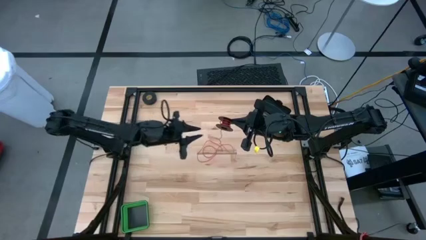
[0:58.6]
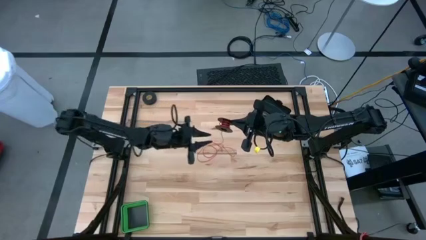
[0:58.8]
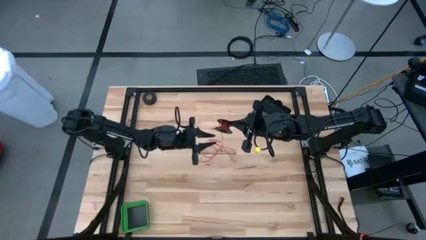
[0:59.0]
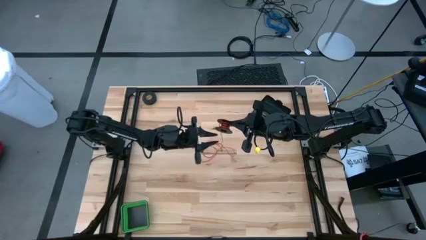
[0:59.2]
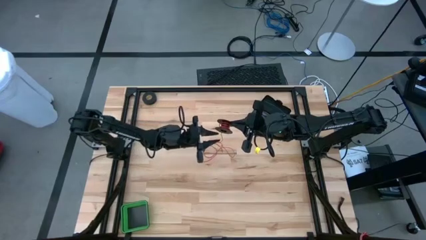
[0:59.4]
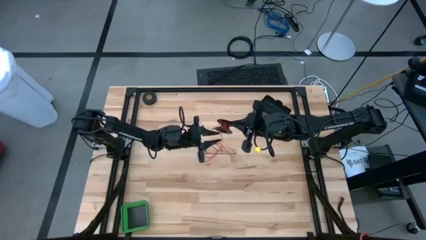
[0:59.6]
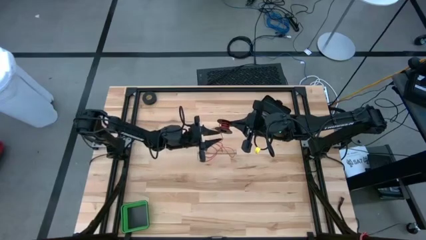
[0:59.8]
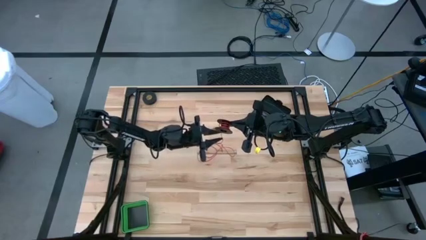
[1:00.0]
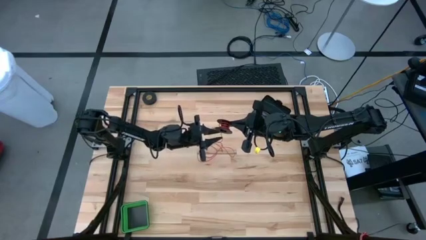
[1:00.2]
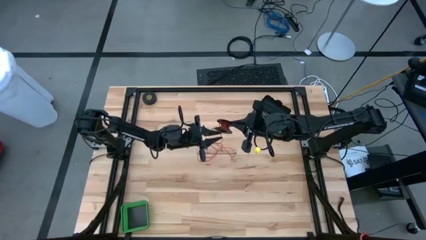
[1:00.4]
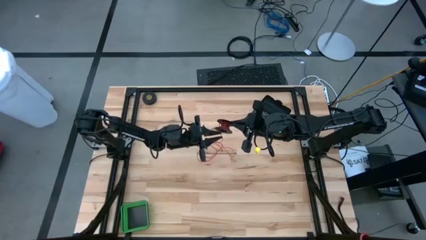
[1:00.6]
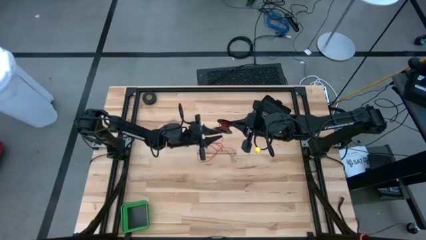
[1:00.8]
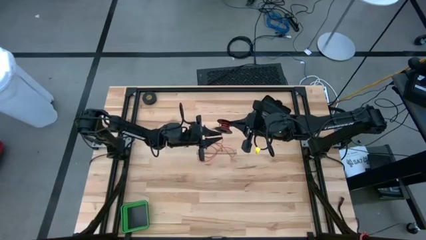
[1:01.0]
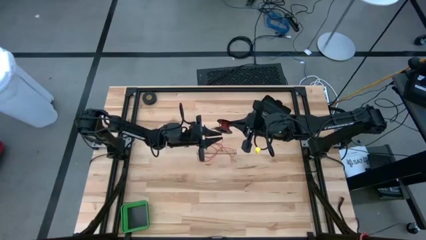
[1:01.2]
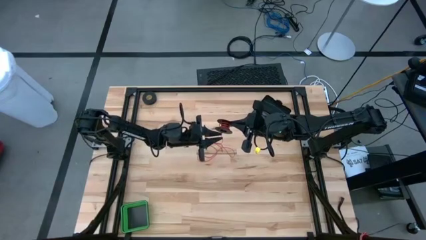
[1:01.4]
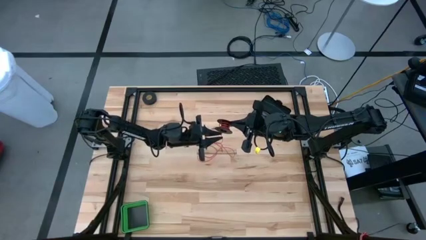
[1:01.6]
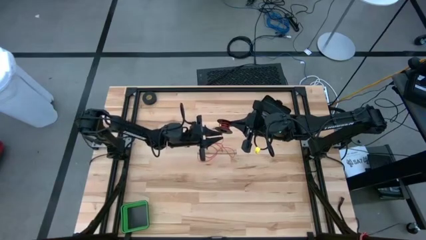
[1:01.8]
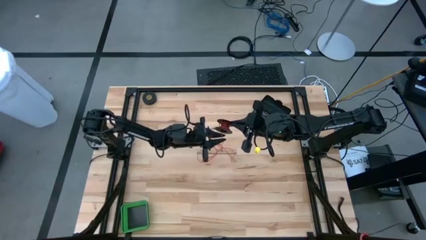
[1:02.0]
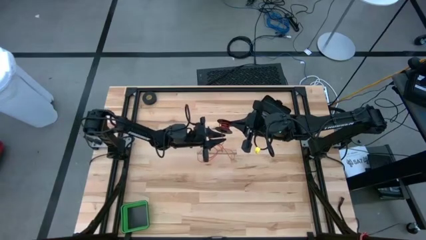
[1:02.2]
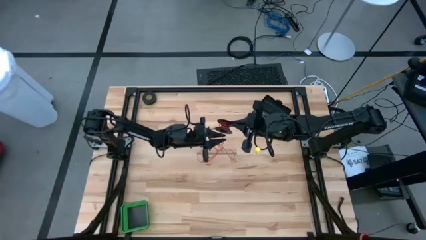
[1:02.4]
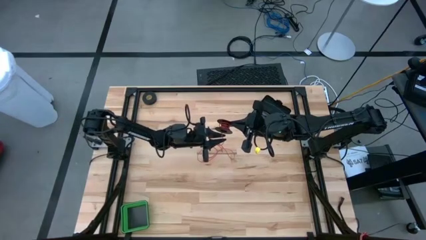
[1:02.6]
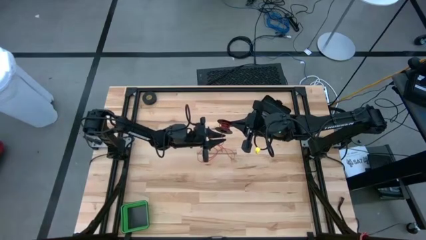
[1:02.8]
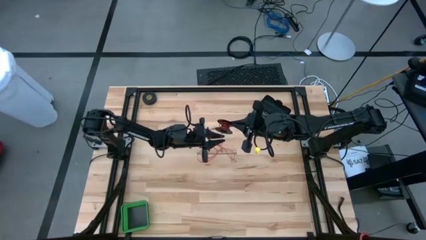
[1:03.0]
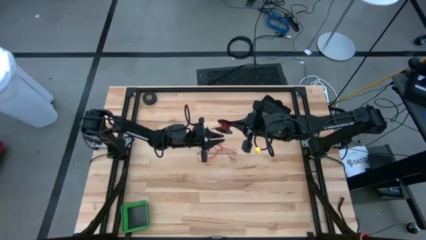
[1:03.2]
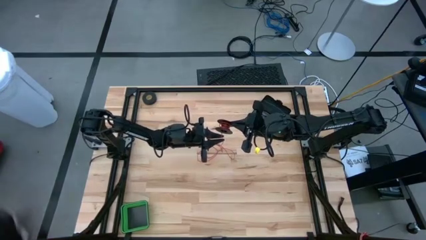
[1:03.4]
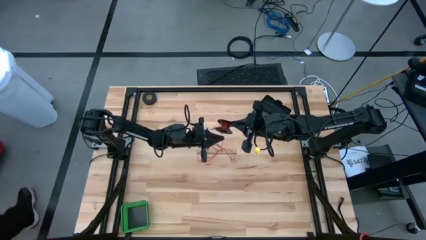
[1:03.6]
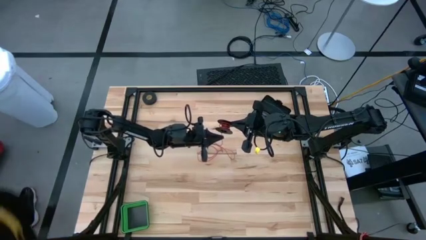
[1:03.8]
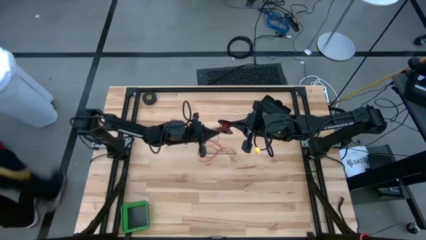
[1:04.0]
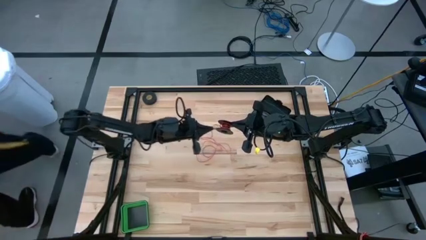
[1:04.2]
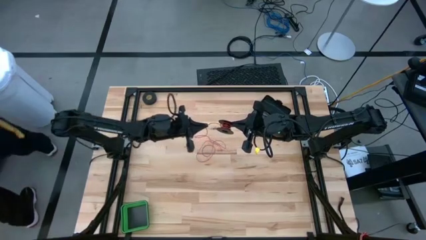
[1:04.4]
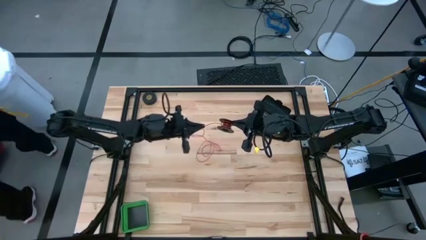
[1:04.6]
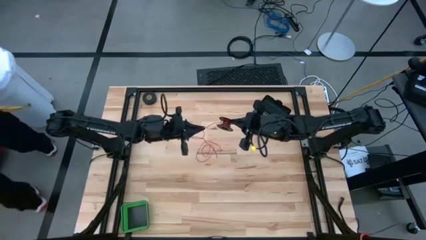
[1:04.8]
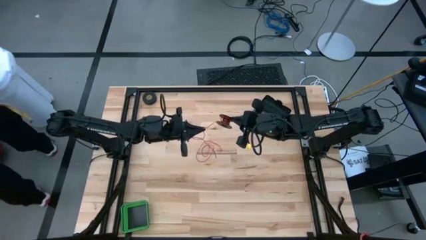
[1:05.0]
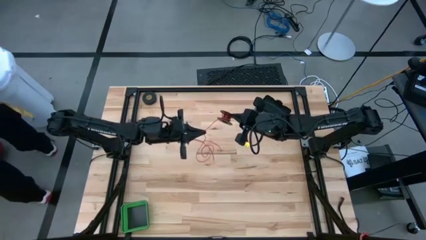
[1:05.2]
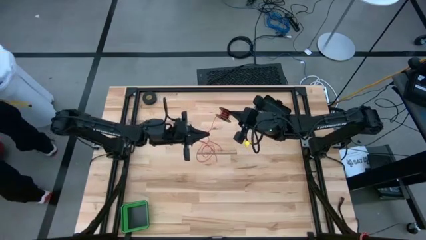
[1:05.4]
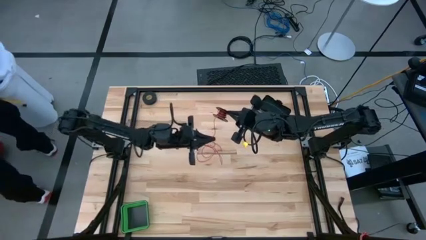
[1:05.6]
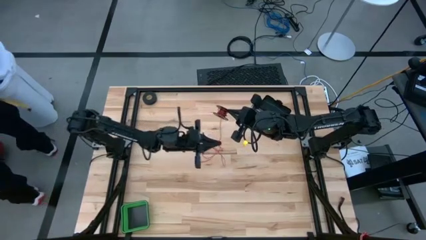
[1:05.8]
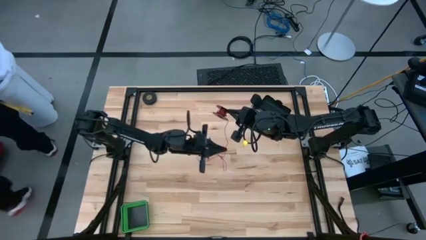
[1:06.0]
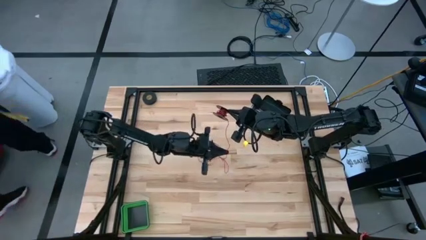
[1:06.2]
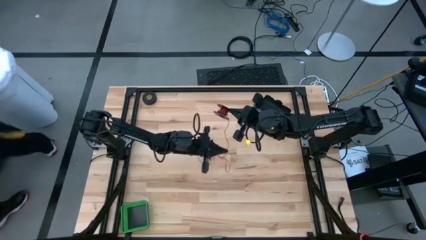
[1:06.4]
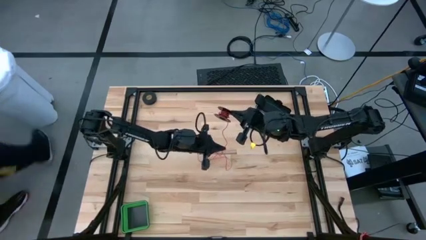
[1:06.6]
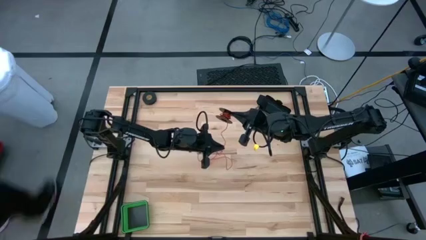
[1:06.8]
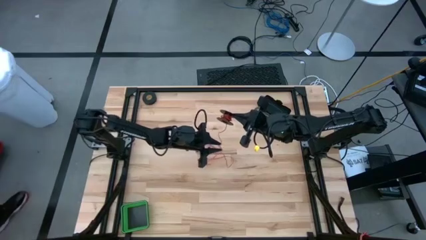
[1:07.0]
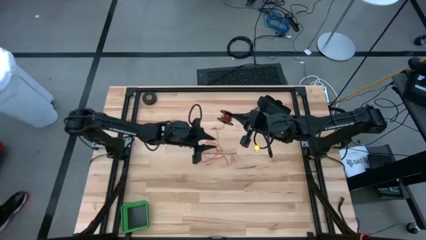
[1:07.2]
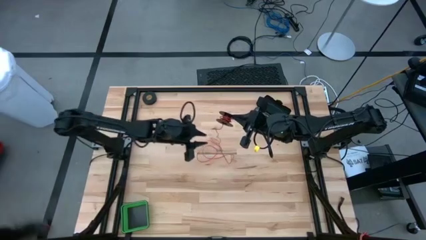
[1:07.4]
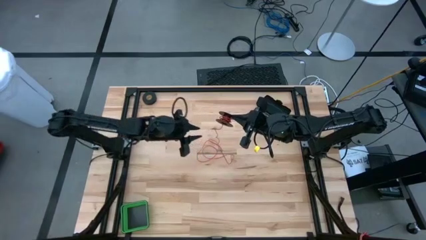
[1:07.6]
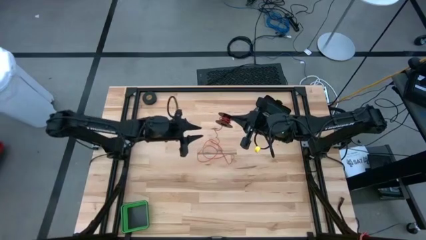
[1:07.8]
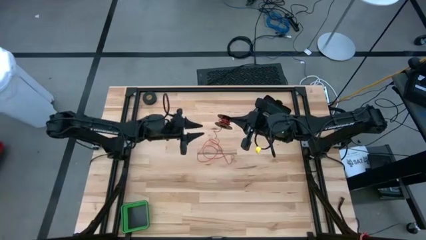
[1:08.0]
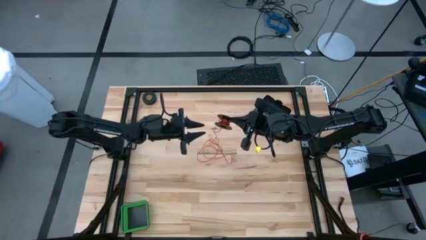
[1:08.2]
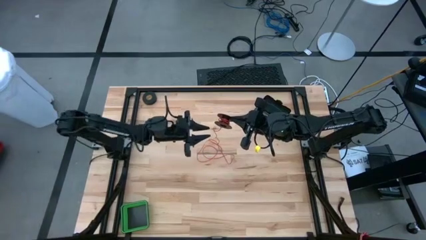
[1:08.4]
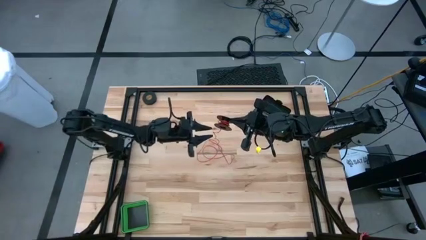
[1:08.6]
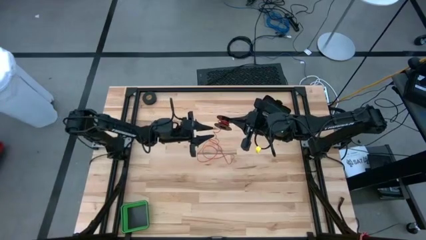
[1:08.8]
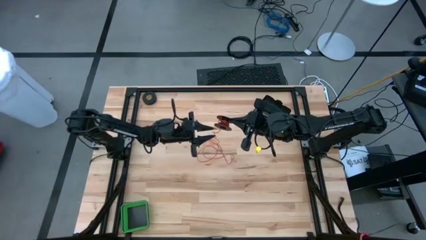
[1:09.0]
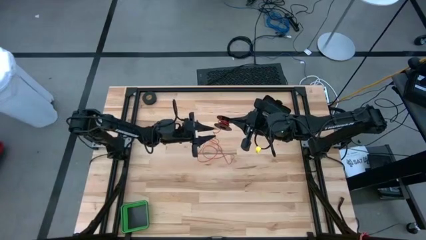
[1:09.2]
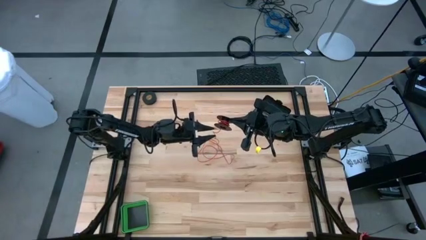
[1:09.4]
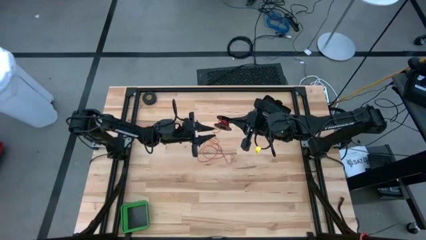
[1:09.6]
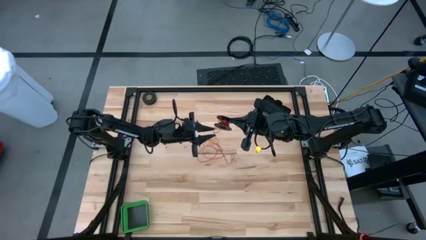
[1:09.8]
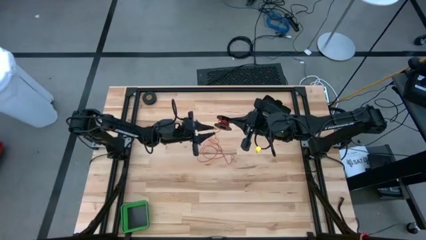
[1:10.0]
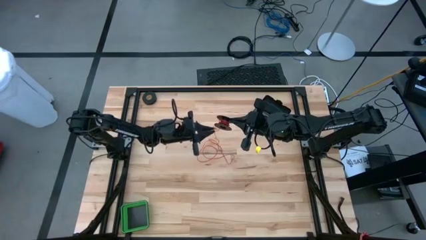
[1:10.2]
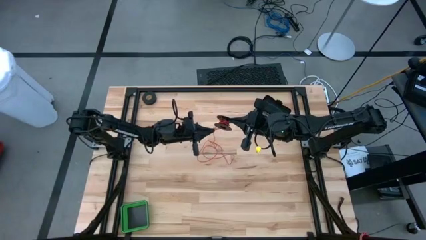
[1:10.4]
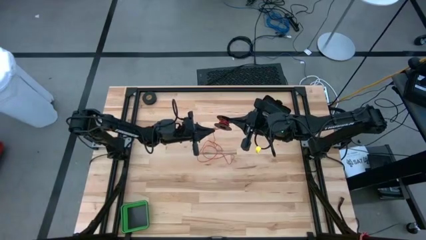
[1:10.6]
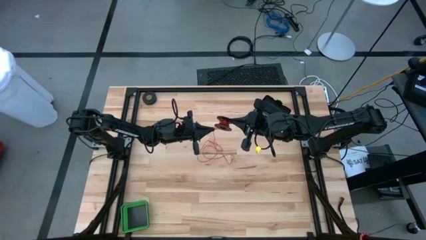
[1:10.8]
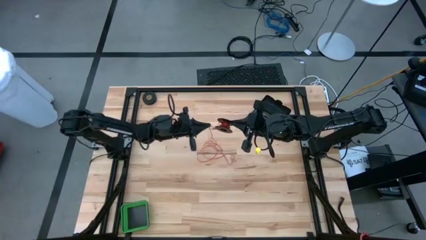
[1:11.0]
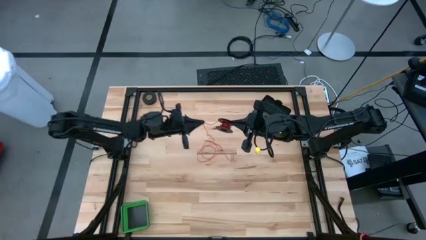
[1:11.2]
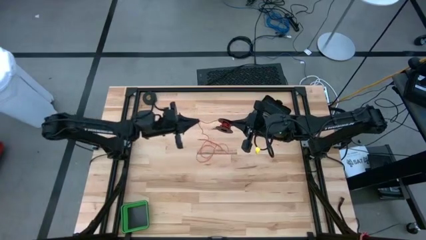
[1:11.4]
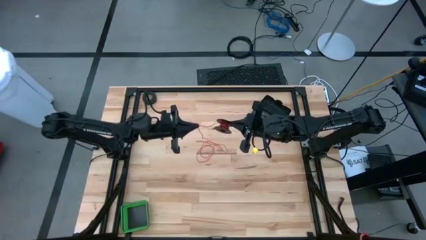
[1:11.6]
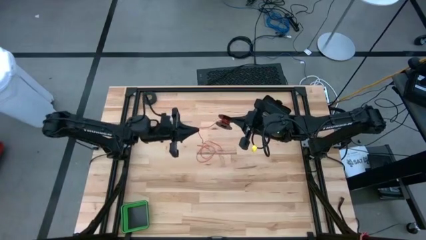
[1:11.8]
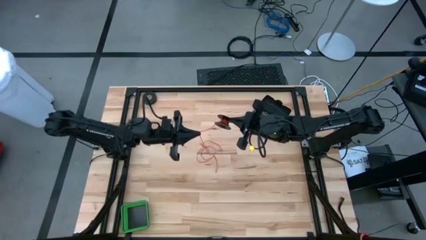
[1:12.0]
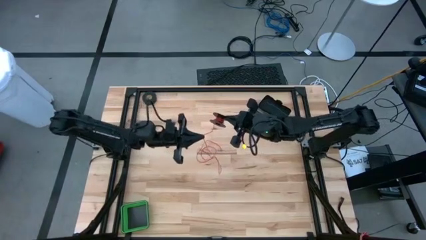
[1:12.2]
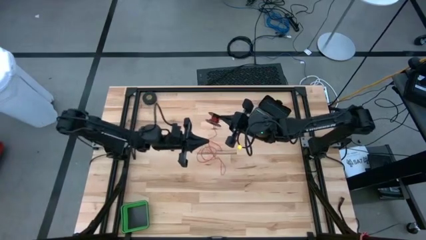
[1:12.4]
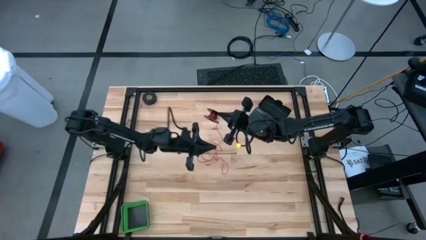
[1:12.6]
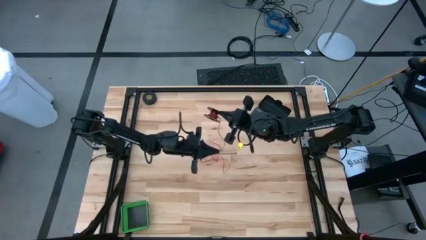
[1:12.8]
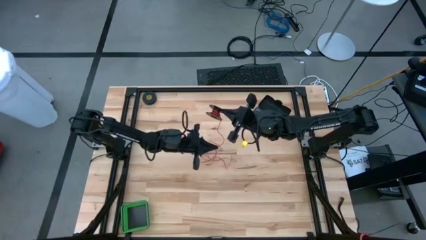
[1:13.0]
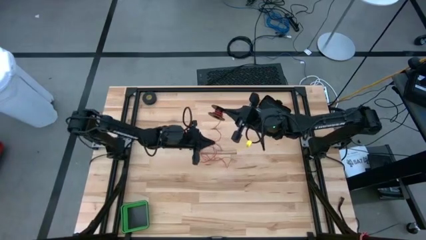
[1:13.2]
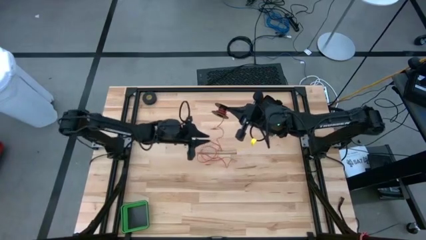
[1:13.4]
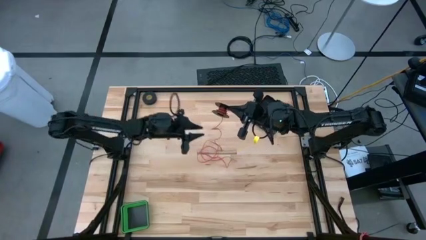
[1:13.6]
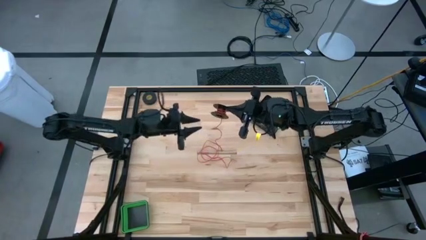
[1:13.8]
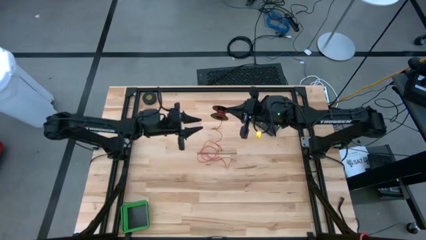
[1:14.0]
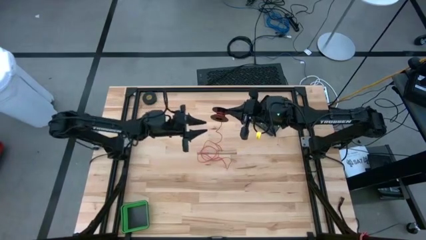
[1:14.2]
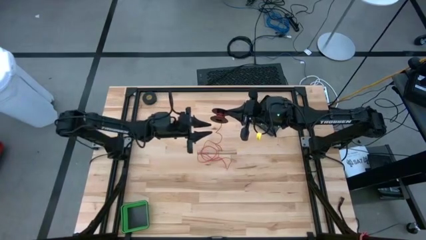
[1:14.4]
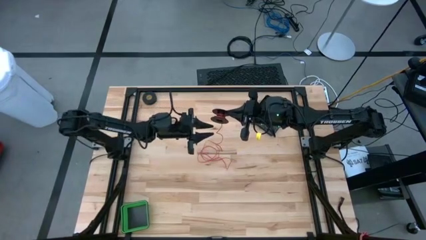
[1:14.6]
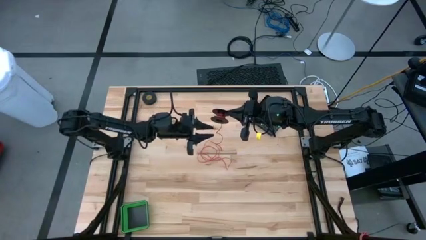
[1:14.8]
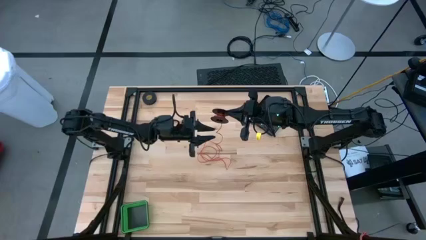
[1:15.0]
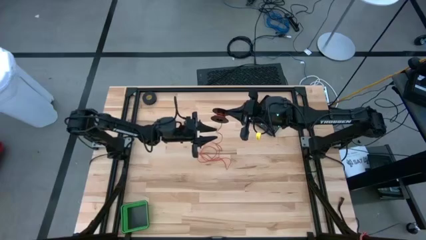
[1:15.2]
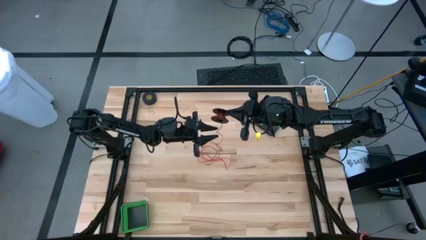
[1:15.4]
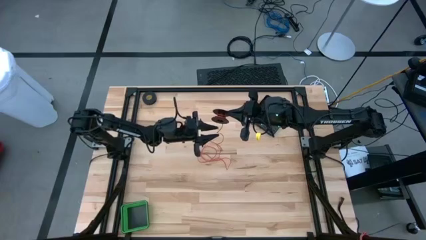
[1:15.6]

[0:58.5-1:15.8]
Task: Coil cords
Uncoil the red wire from the spool
